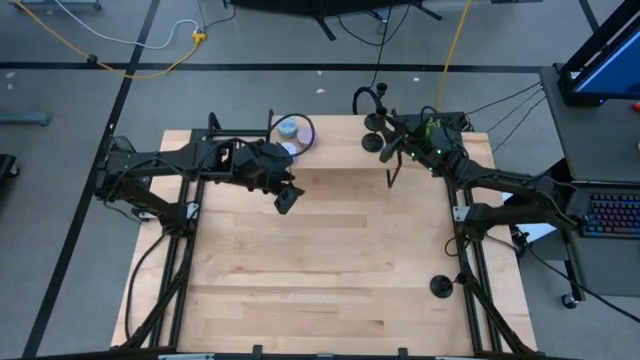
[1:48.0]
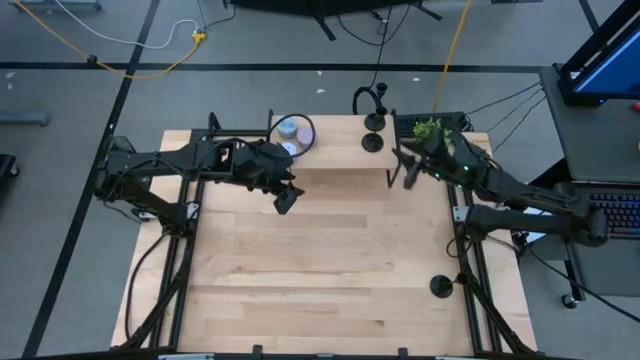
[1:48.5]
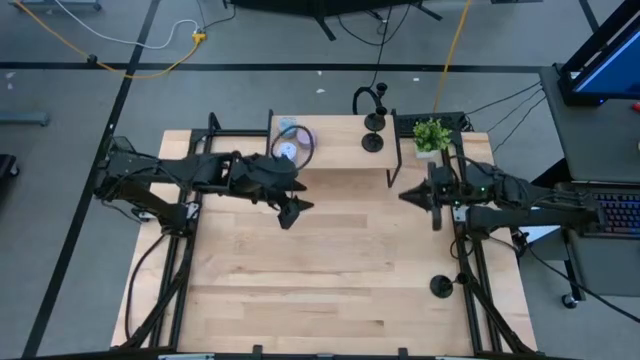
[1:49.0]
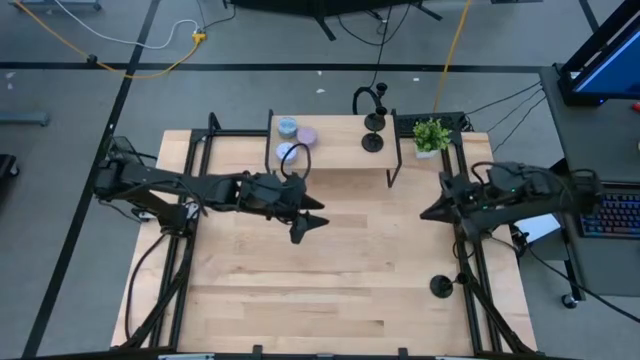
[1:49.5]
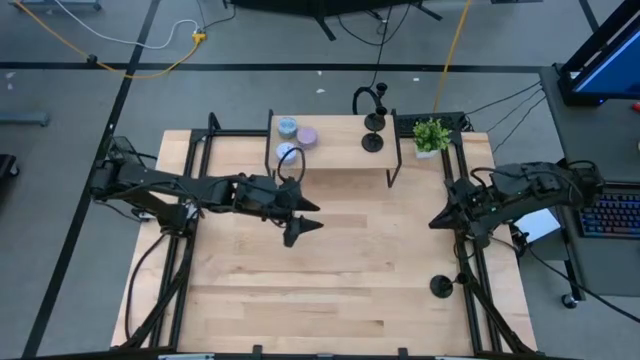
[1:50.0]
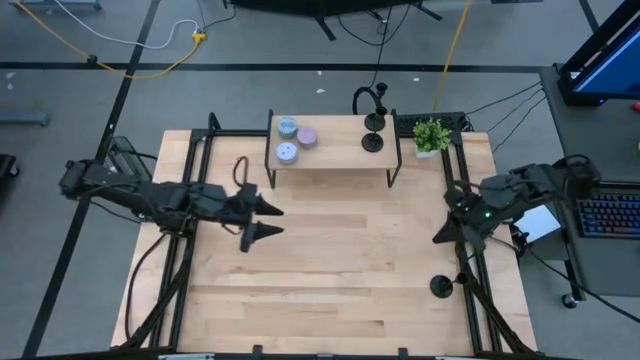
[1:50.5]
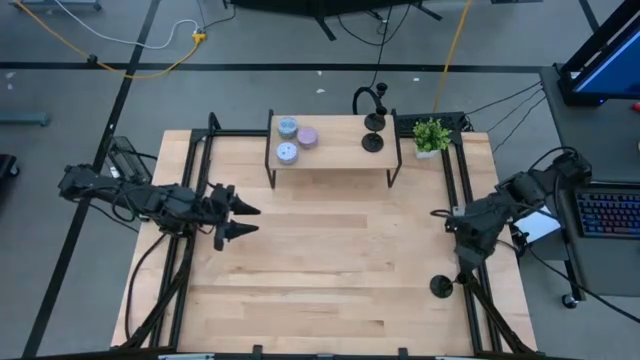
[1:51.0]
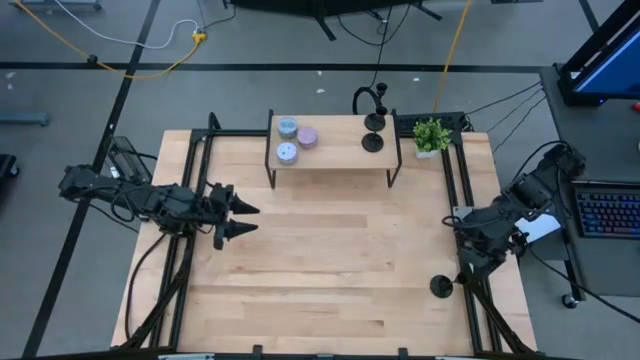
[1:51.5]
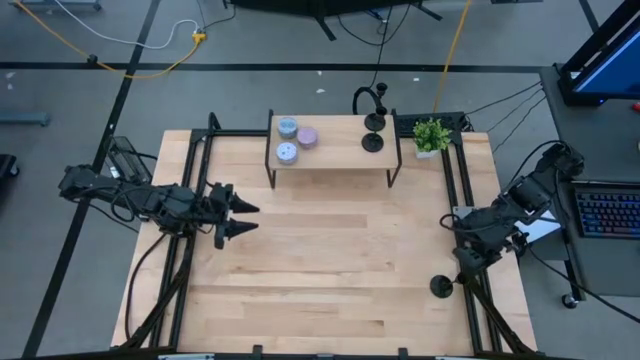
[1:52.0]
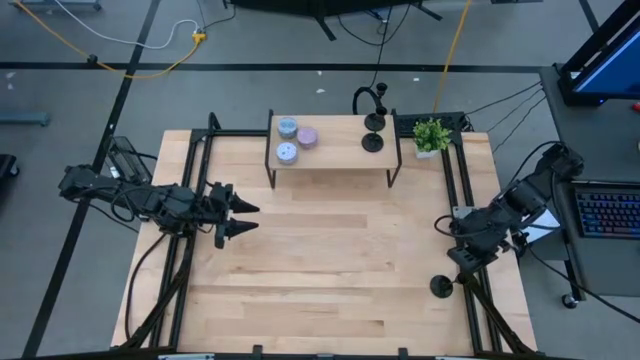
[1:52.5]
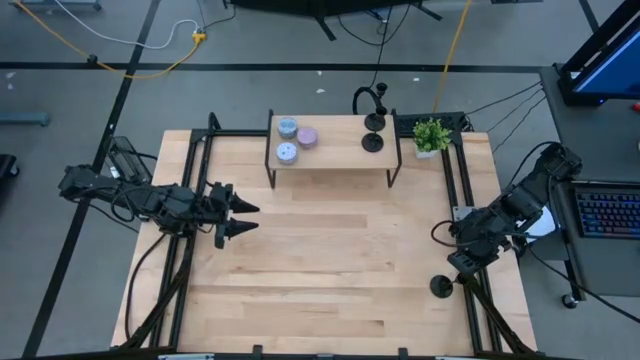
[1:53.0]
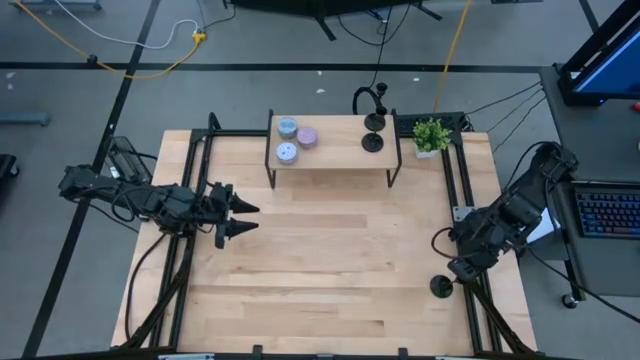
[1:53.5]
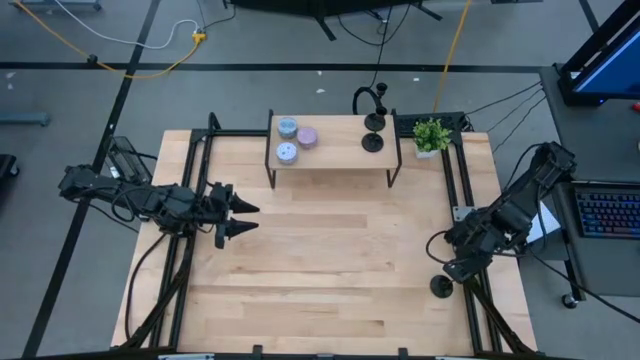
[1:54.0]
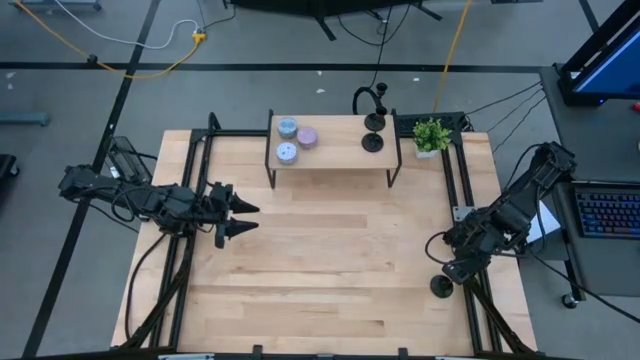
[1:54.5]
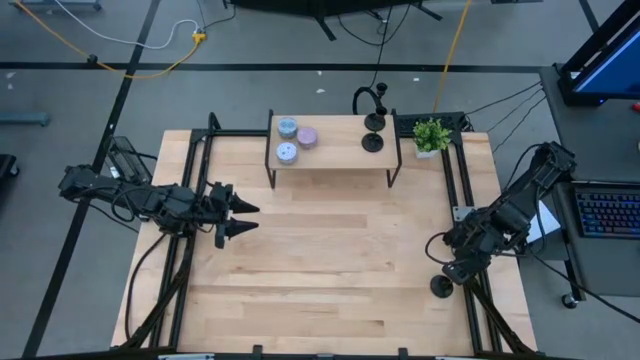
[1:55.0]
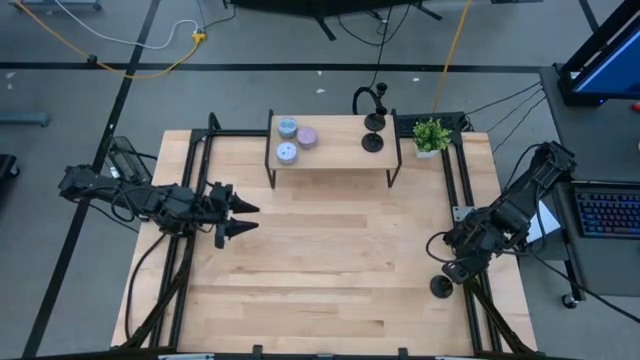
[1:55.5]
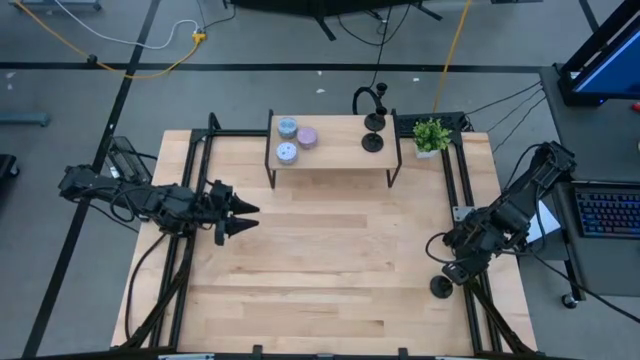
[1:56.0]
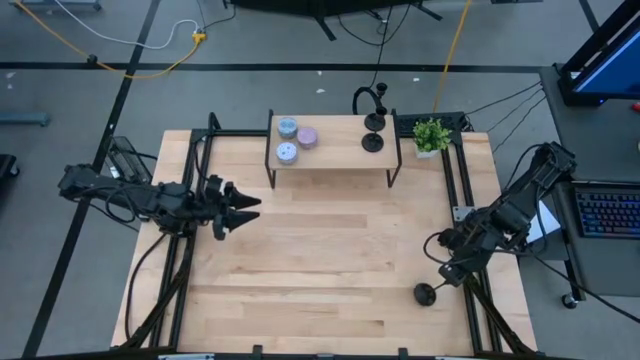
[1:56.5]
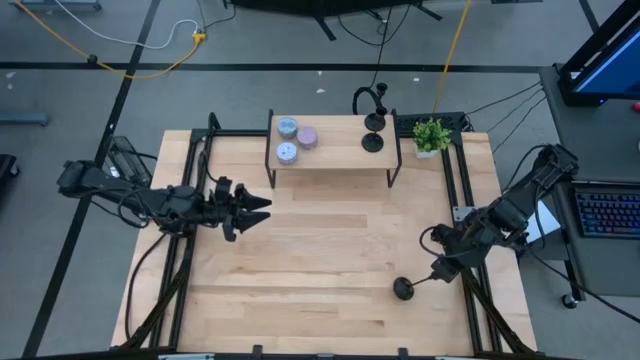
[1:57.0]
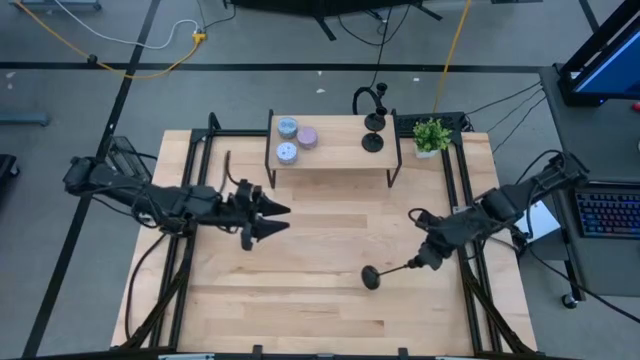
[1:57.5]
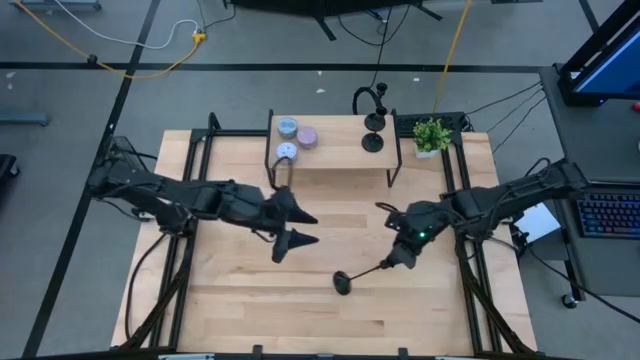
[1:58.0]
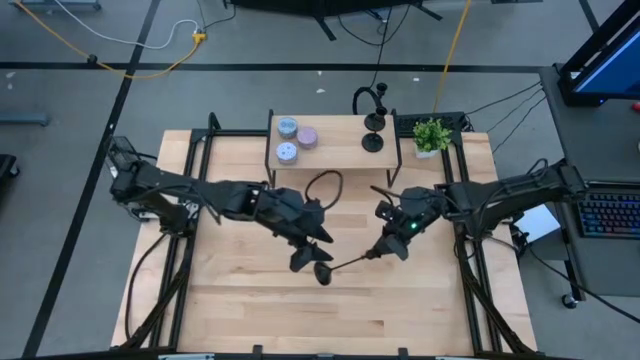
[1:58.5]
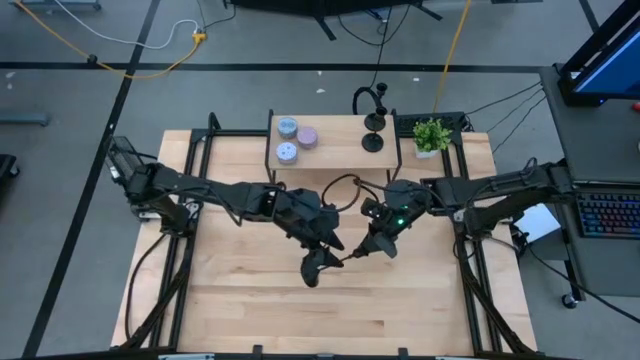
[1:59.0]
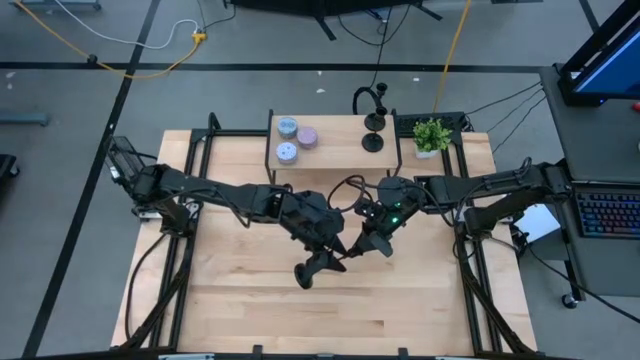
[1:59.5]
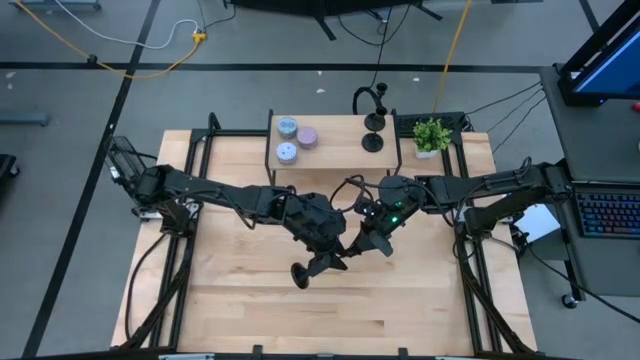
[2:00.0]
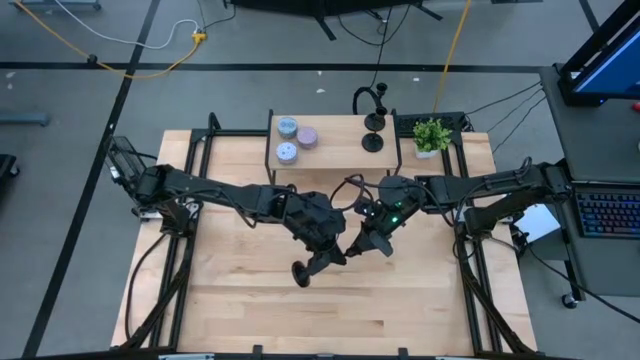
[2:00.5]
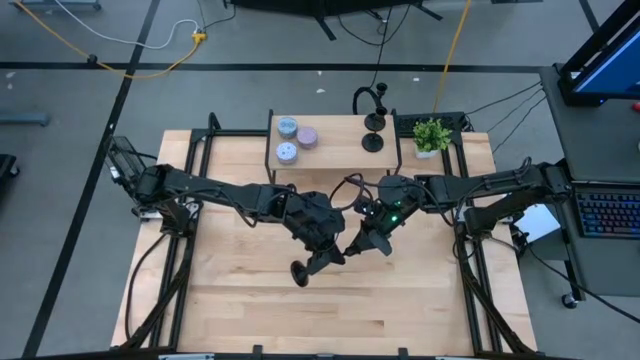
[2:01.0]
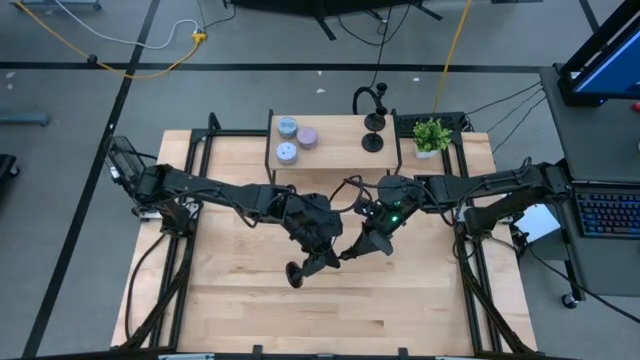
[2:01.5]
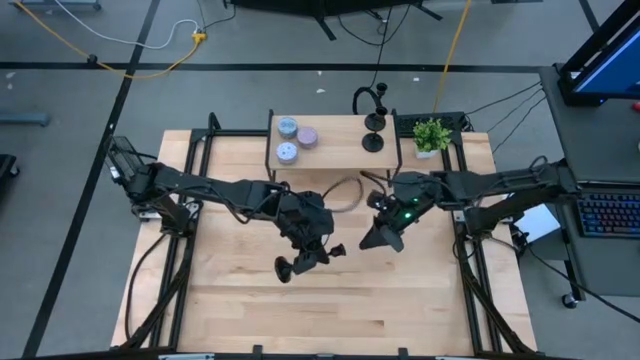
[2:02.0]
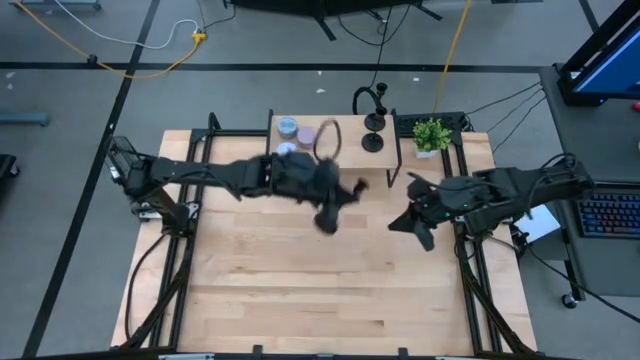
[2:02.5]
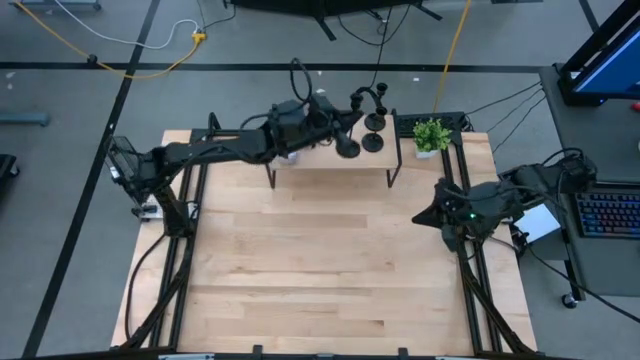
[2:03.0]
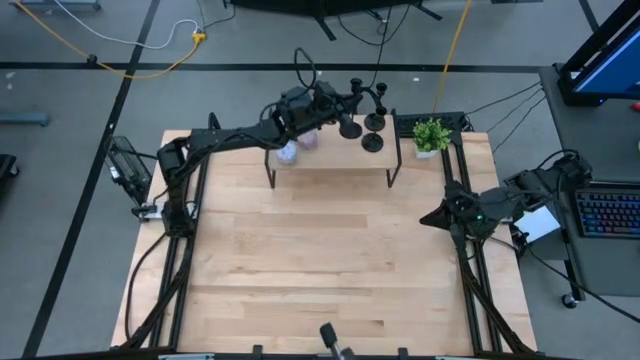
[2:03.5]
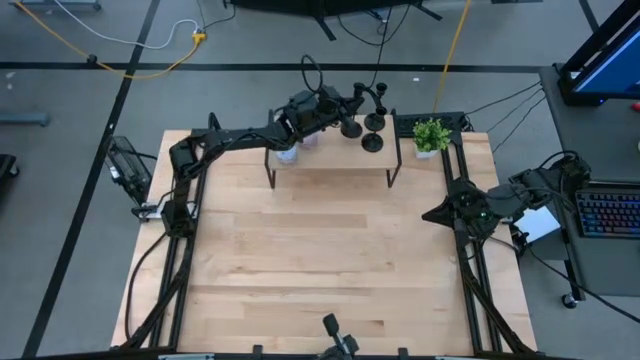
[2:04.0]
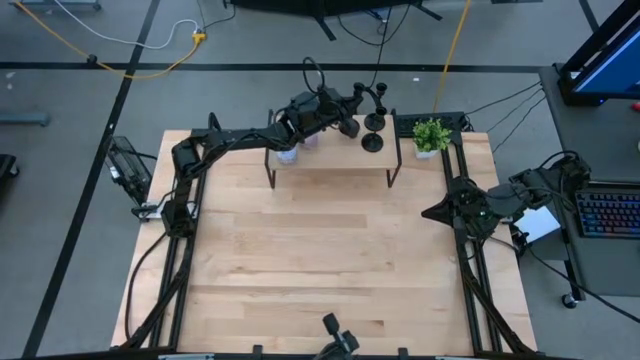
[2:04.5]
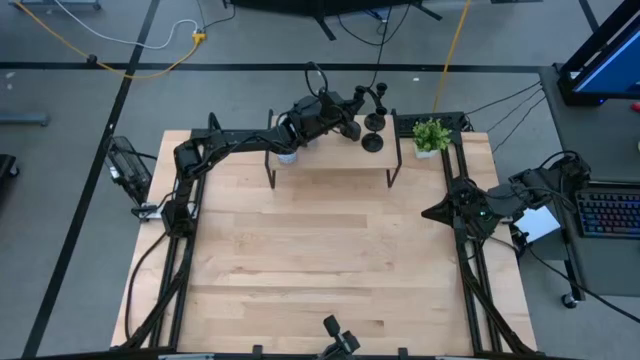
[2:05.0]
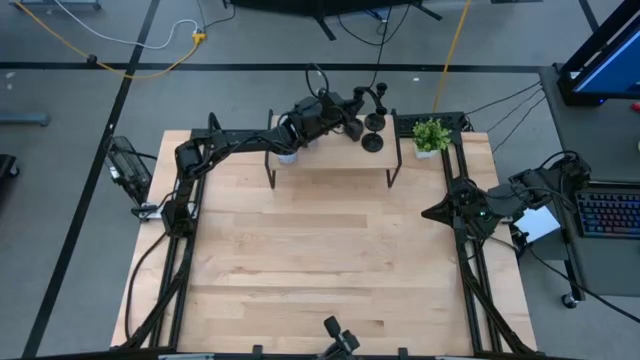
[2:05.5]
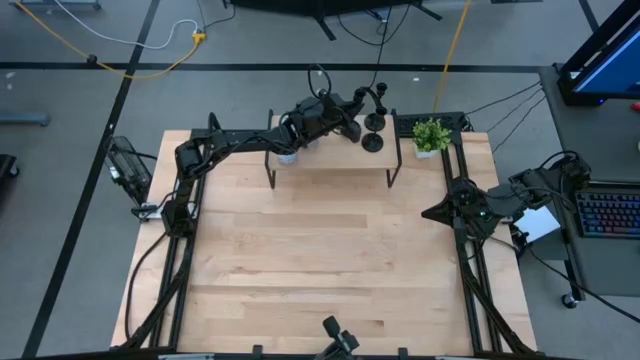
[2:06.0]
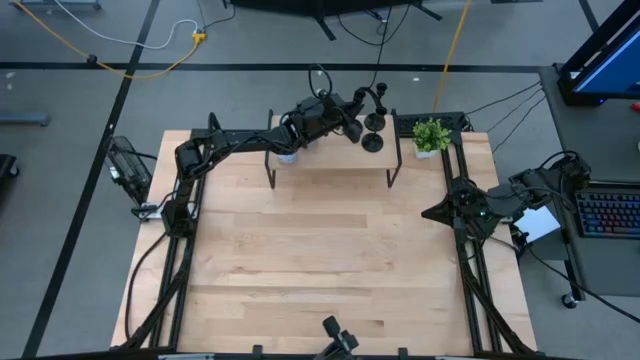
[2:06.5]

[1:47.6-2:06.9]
Task: Pick & Place candle stick holders
Put the black candlestick holder on the shelf

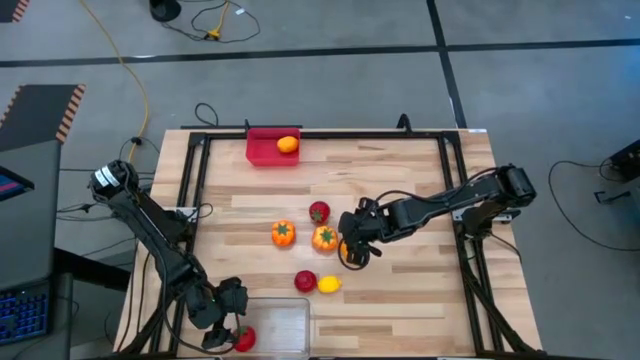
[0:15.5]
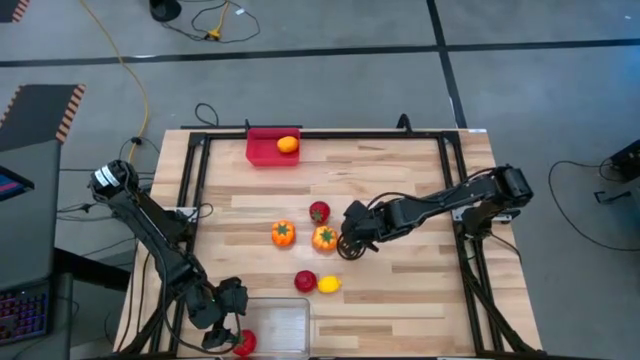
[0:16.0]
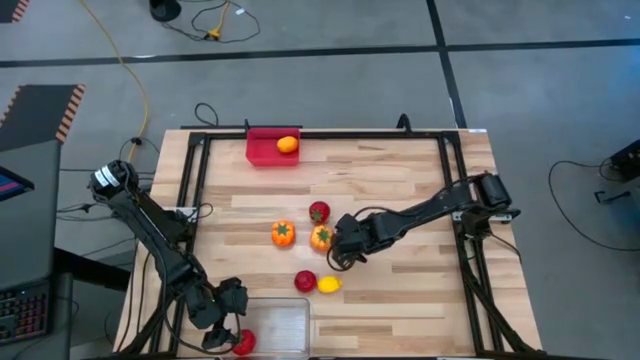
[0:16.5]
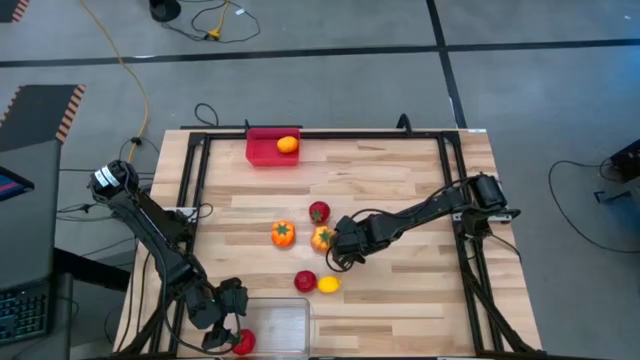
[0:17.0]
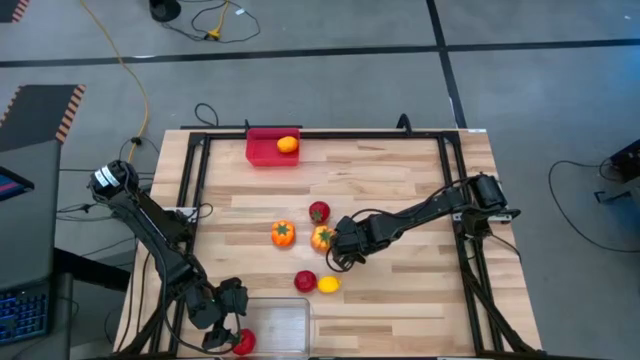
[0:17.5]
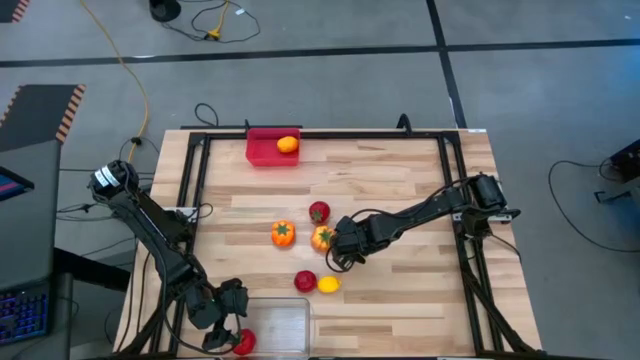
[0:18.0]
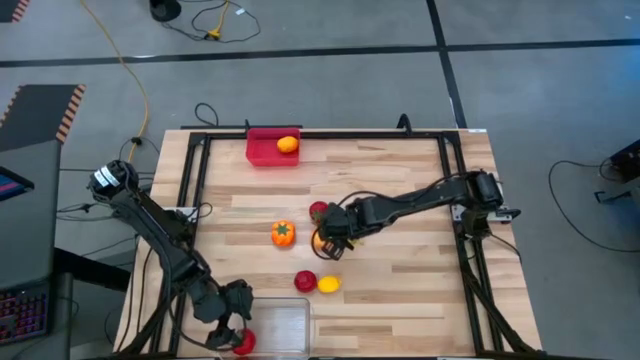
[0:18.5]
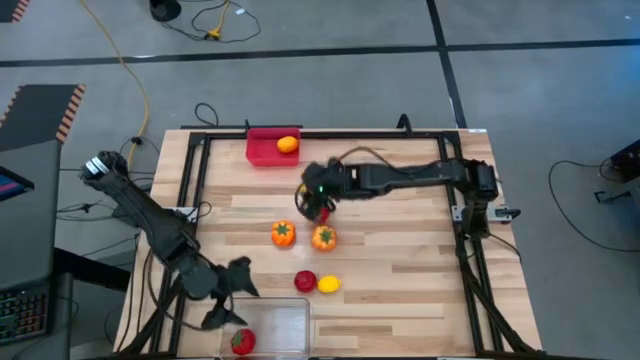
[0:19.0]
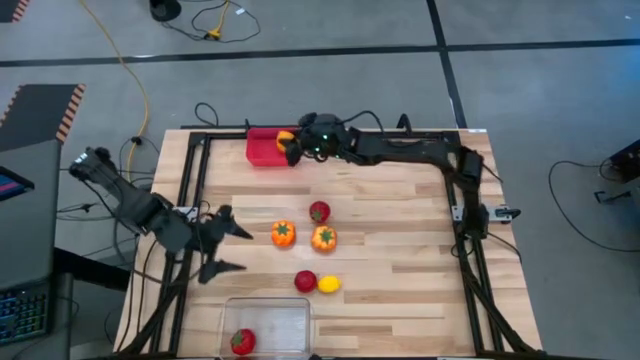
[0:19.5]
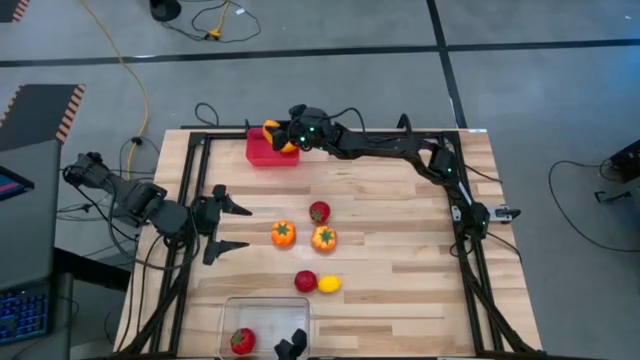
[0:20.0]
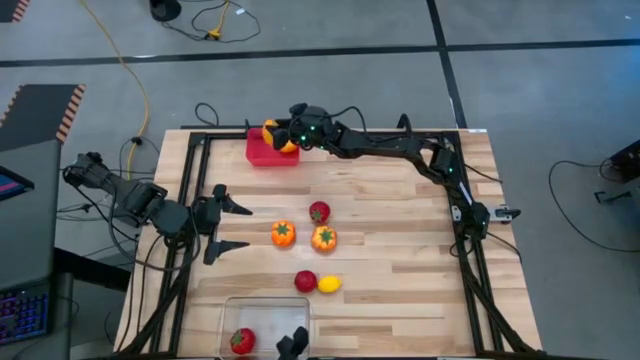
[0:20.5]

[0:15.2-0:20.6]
Task: Sort produce into baskets
Put the top yellow lemon into the red bin
